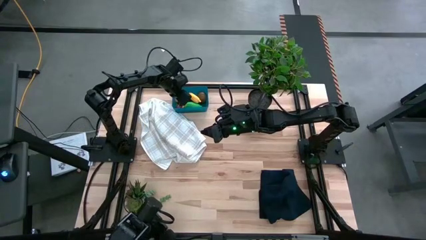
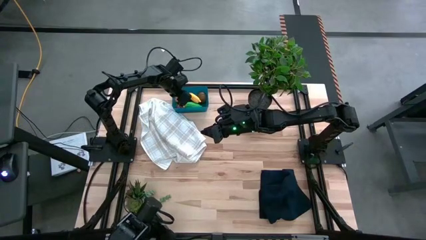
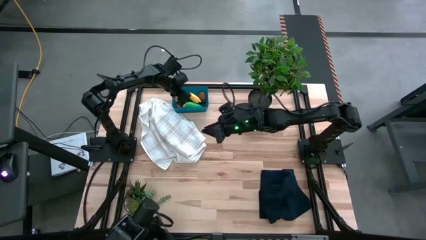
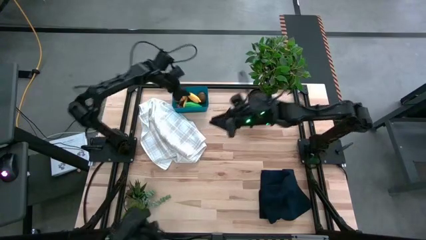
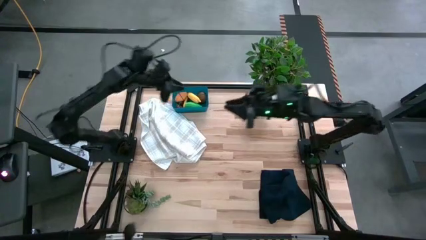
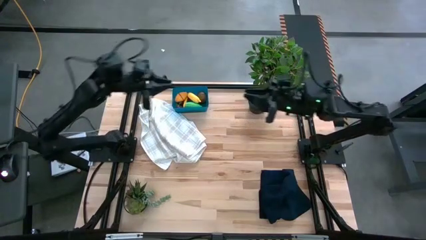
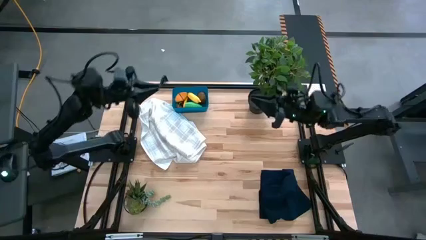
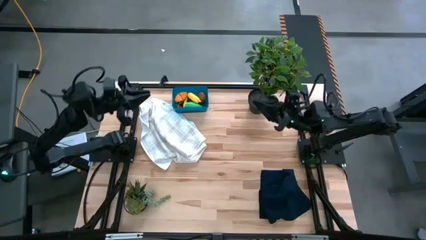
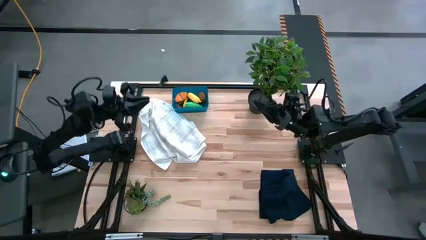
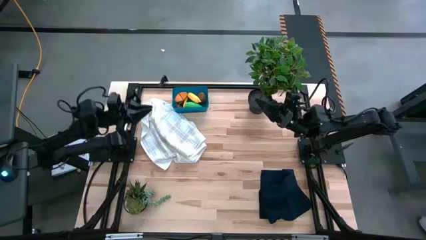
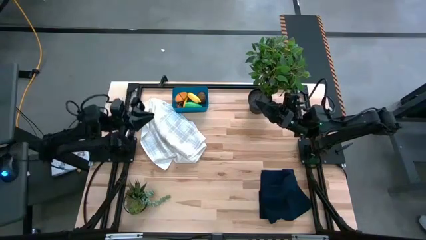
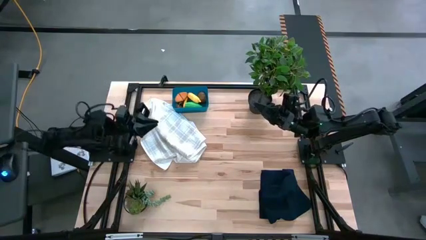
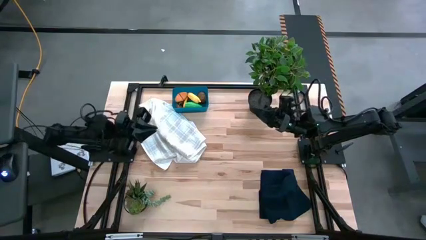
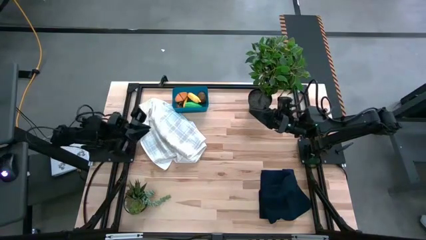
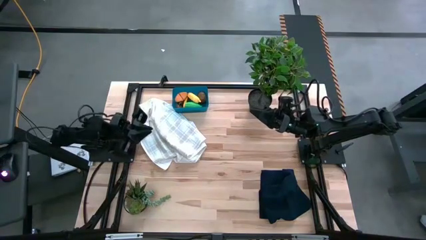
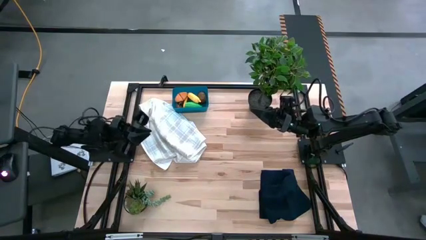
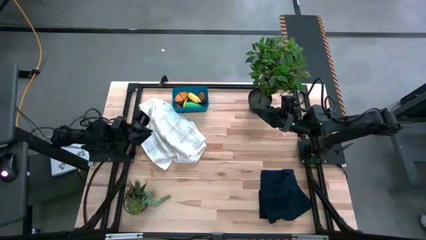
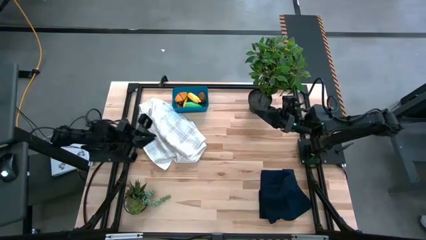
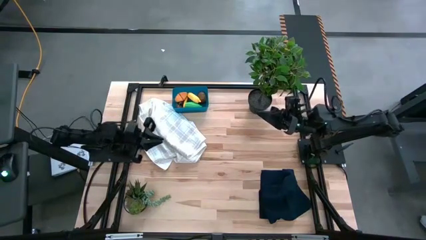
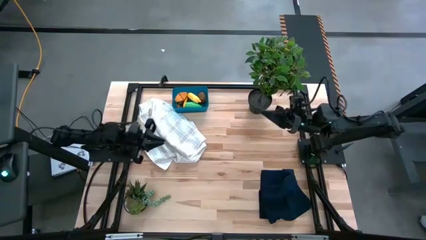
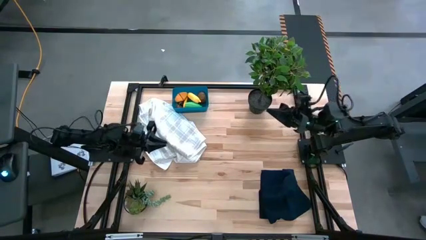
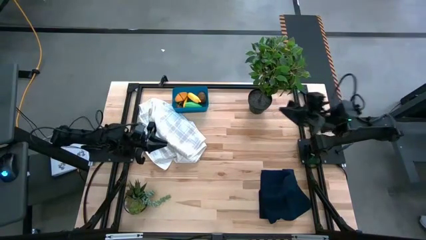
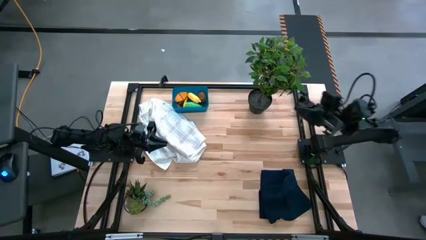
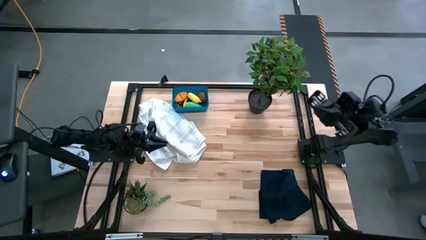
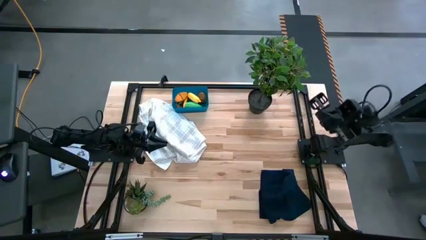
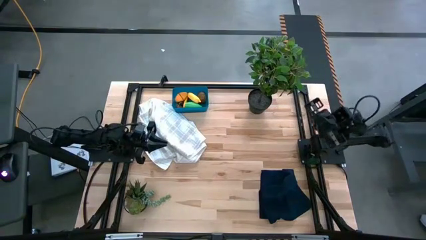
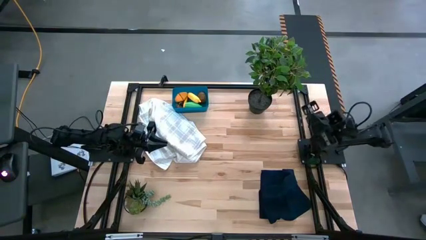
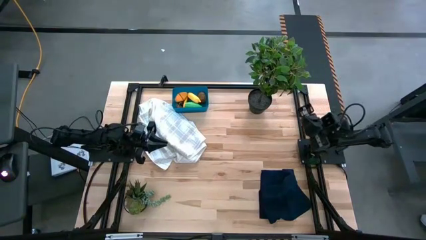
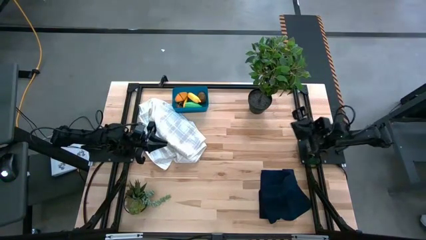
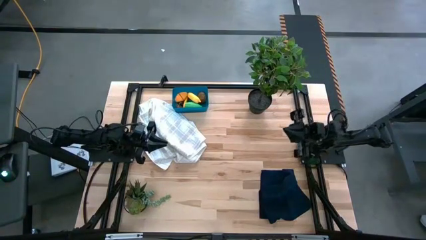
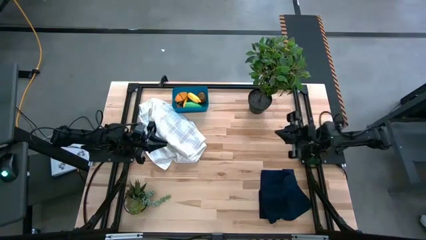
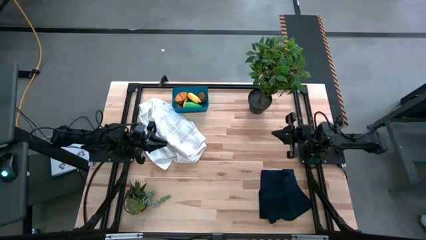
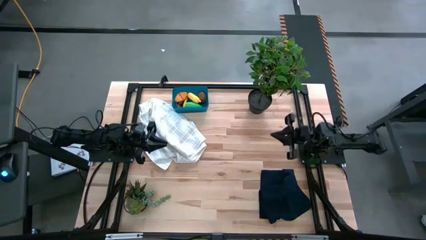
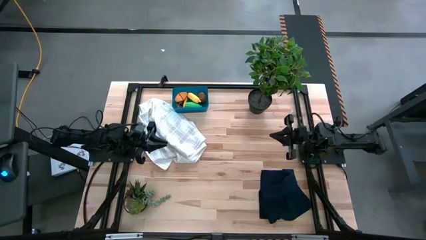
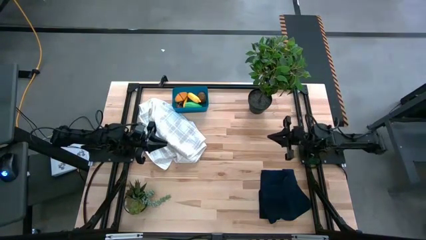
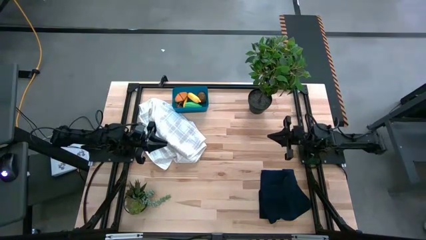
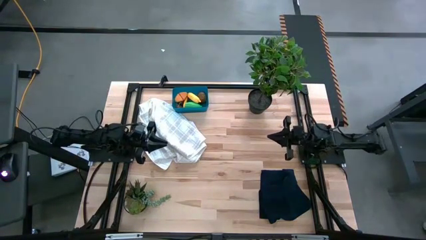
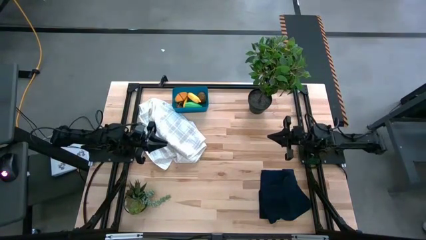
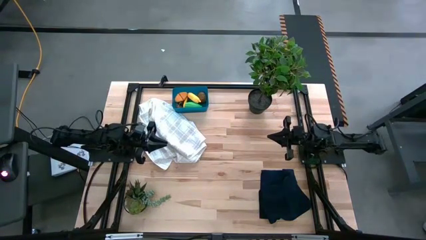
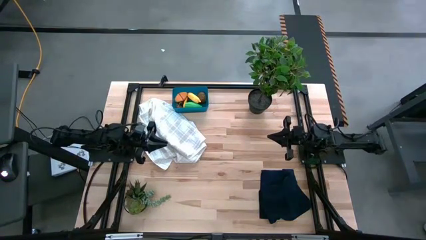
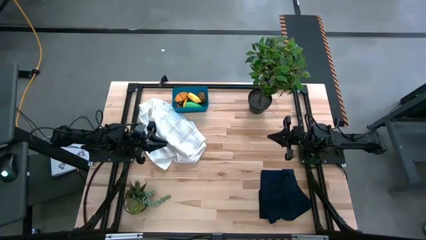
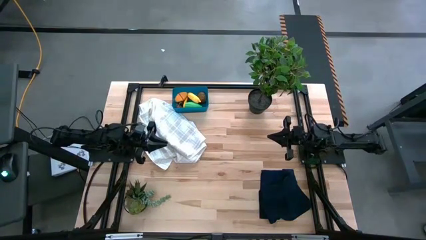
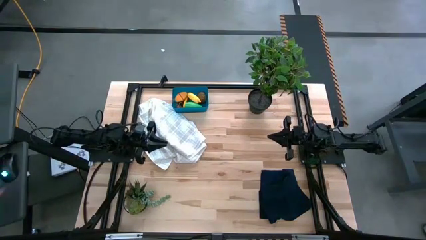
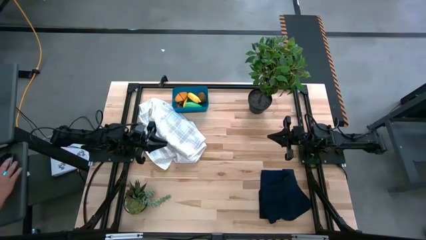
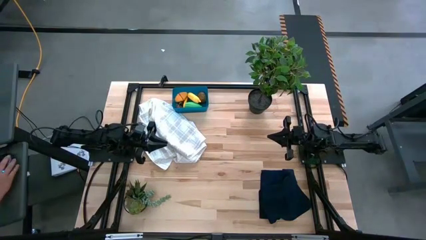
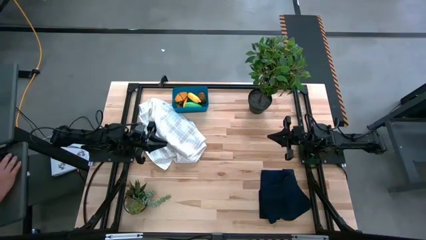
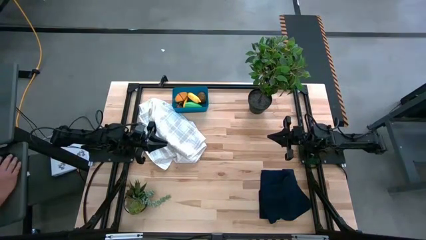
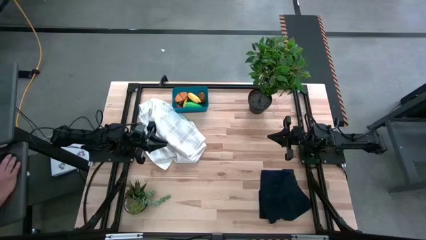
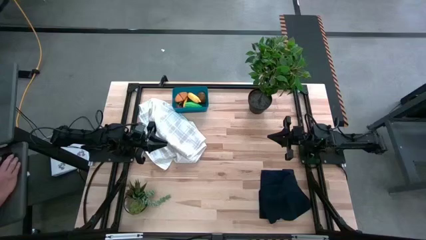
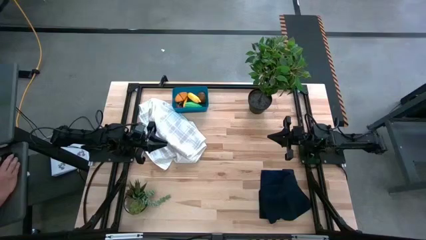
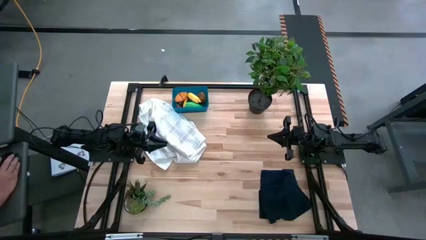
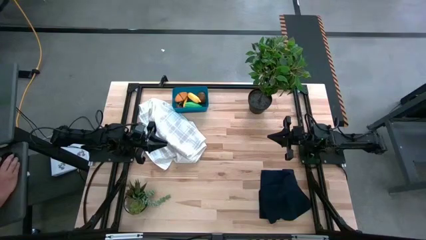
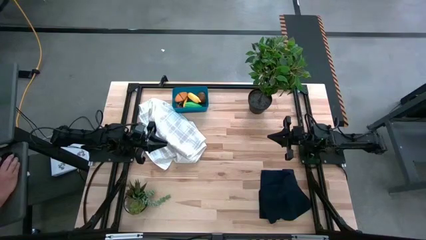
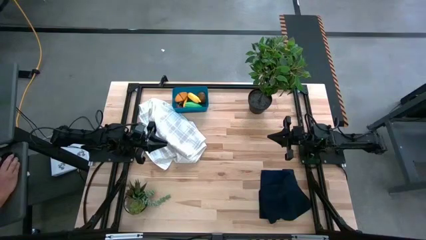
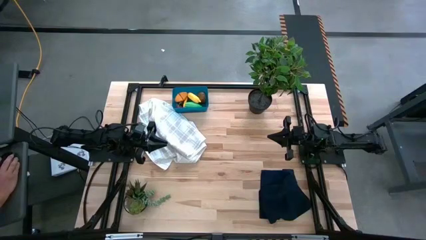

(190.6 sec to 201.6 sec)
Task: Pick and placing Produce into tupperware
Return to home Position
